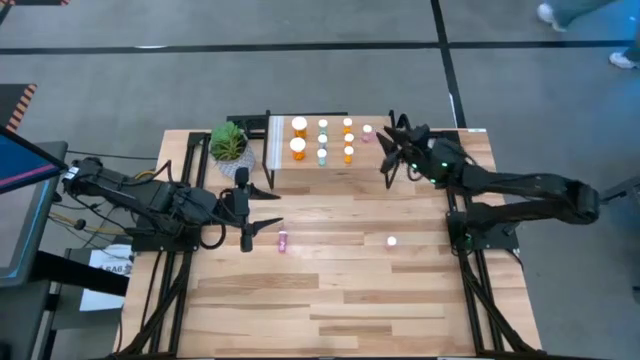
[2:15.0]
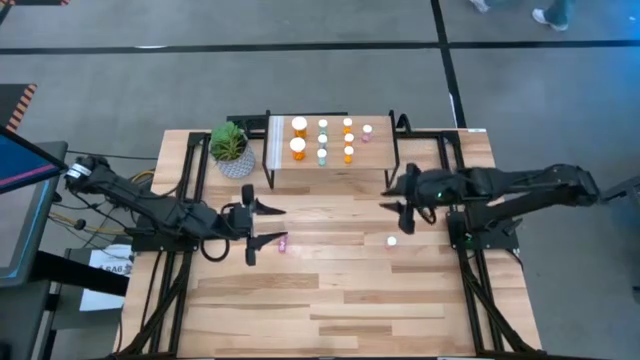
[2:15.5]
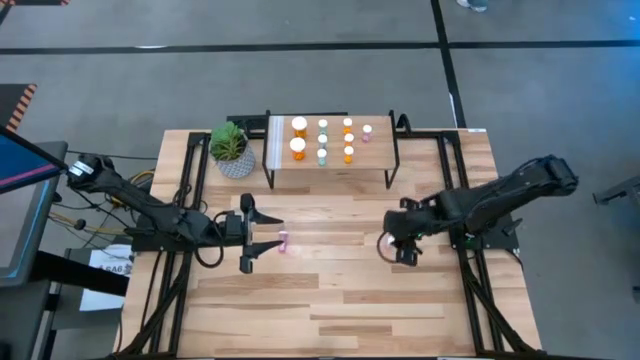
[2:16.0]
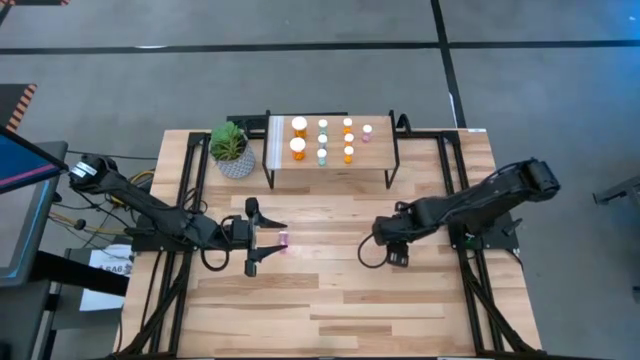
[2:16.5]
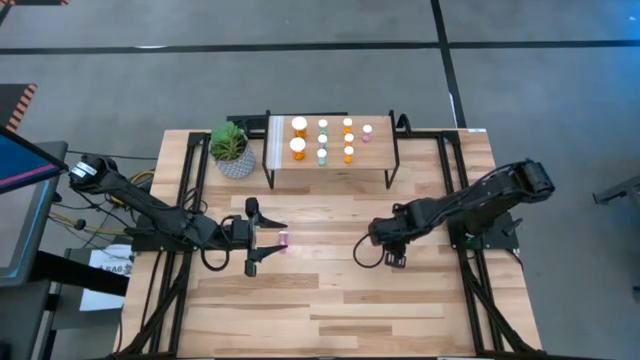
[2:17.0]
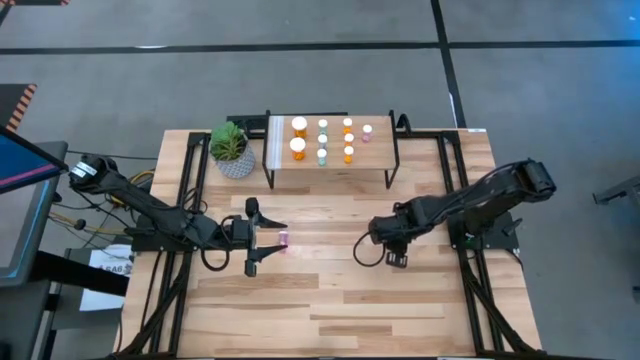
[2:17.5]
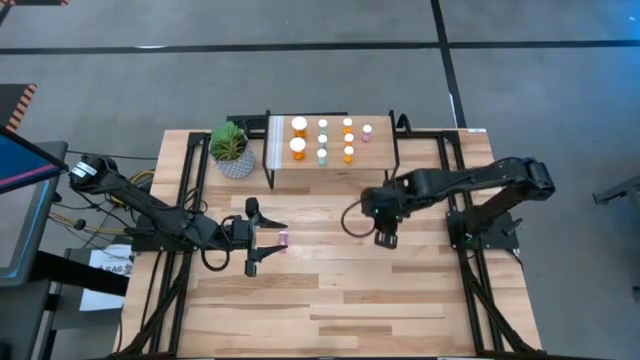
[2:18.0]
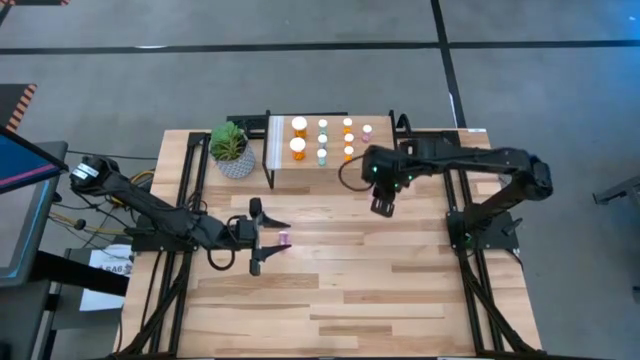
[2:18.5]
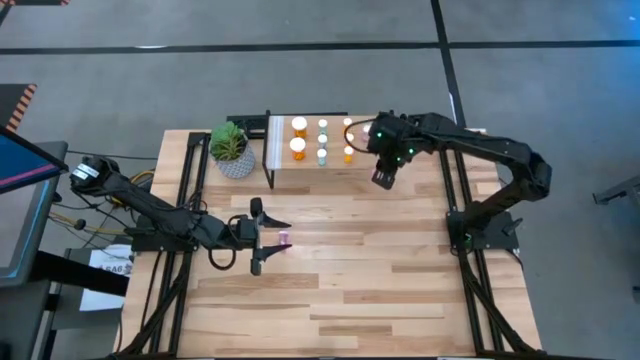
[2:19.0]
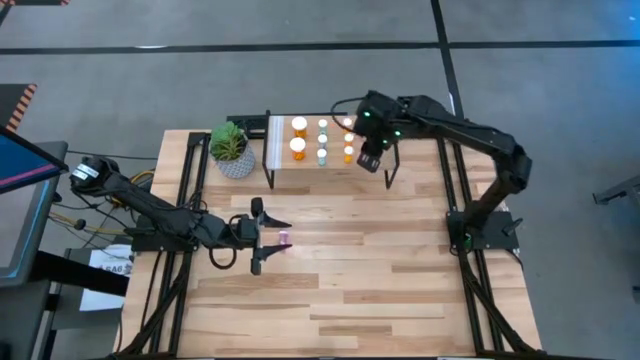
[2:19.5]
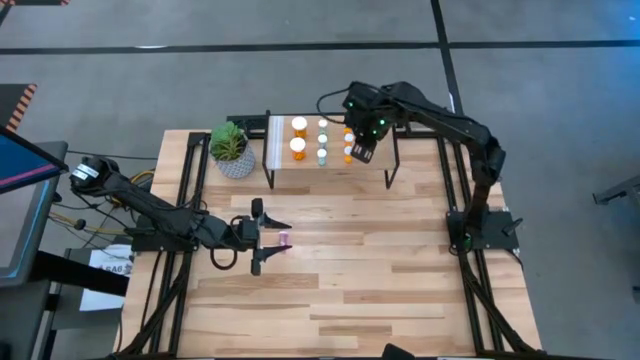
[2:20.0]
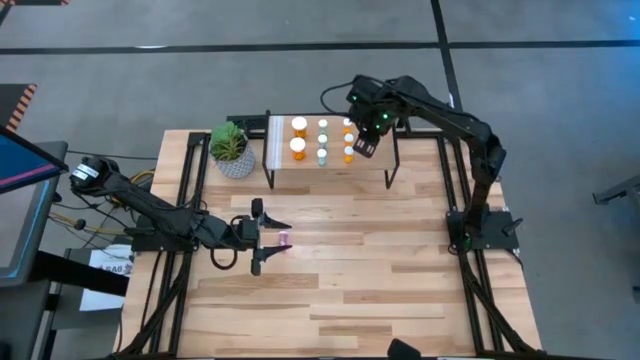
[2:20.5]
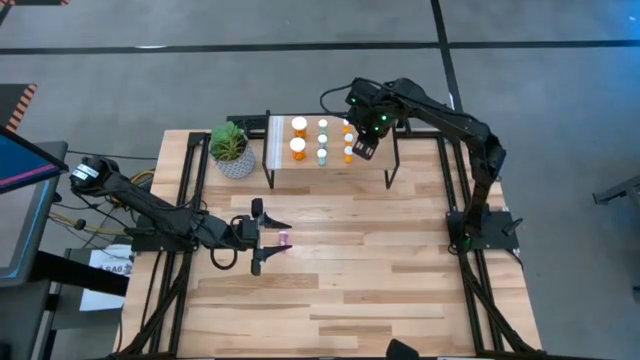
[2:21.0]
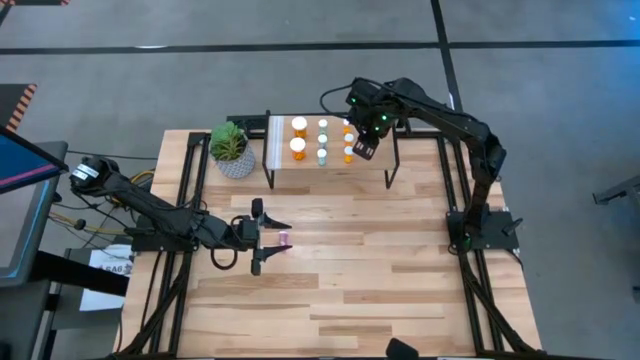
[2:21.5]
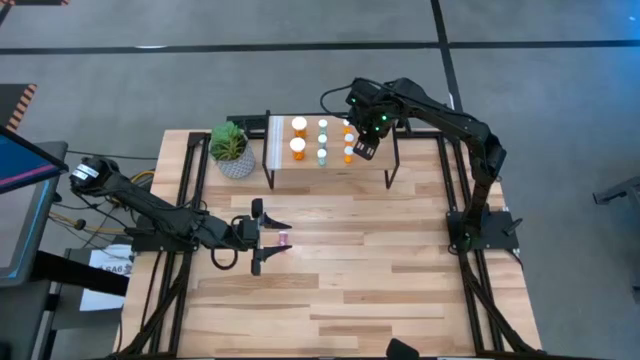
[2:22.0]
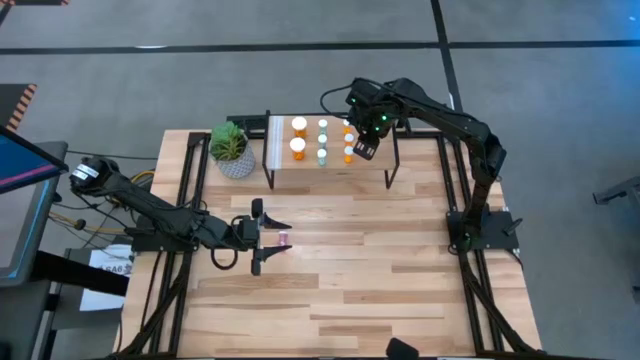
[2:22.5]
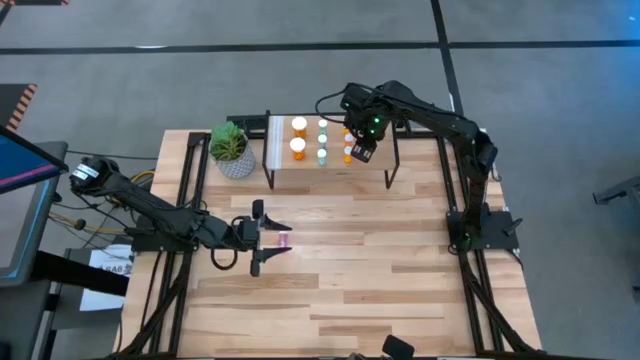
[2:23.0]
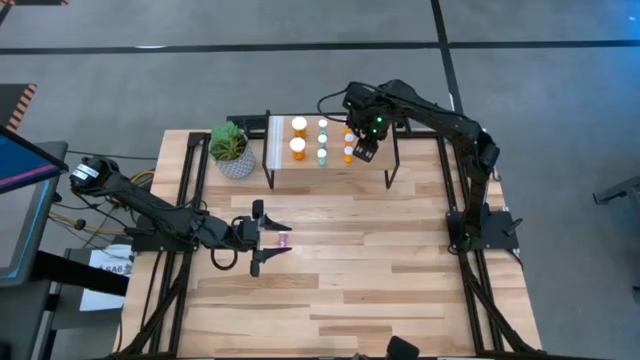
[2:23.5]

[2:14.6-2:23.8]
Task: Pick and place medicine bottles onto shelf by color
Put the pink pill bottle on the shelf aligned with the other pink pill bottle

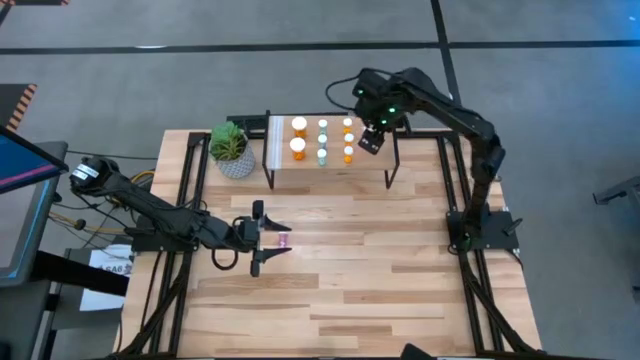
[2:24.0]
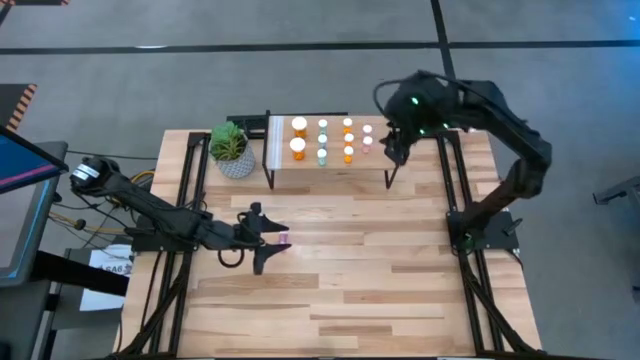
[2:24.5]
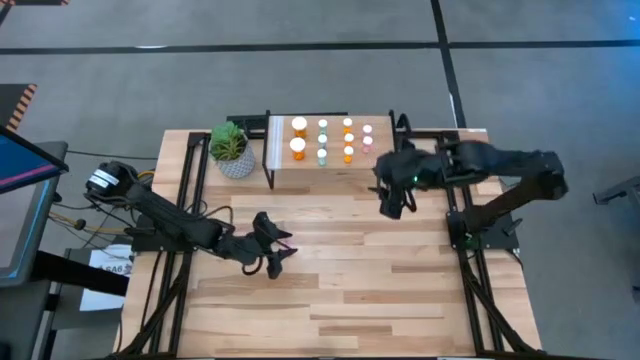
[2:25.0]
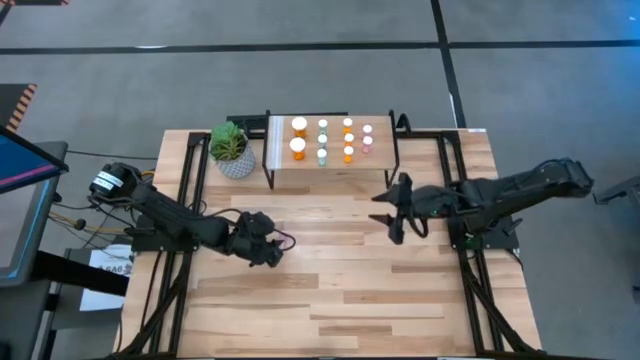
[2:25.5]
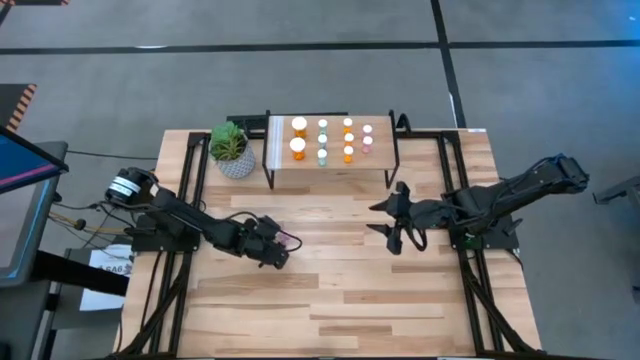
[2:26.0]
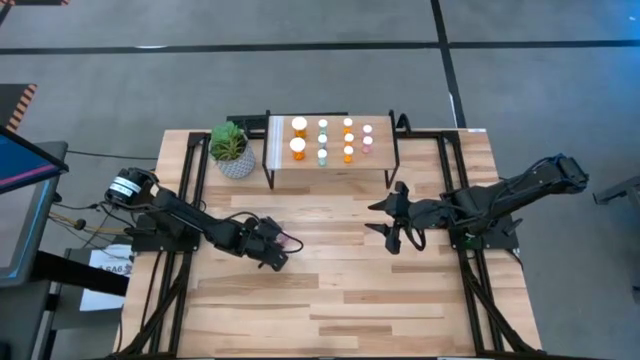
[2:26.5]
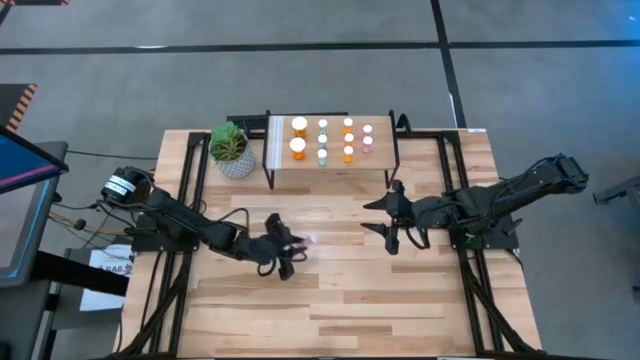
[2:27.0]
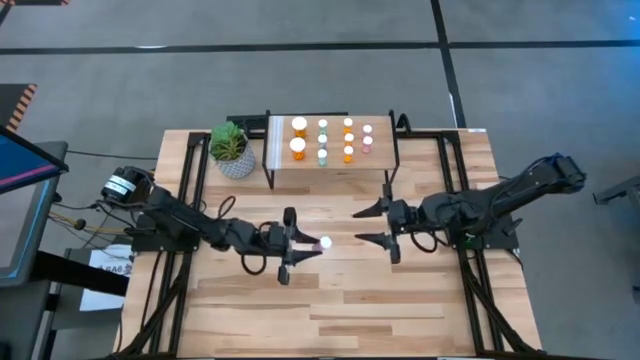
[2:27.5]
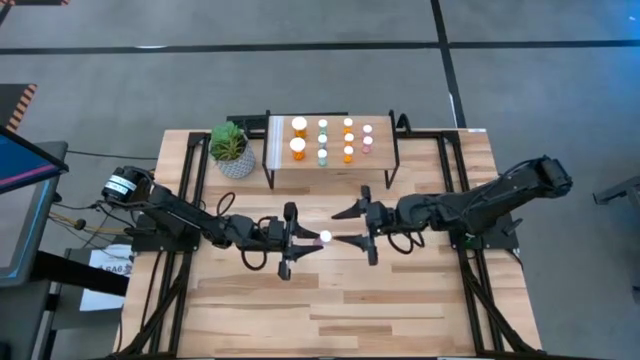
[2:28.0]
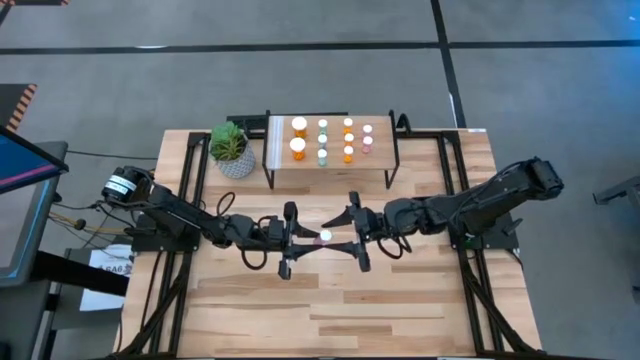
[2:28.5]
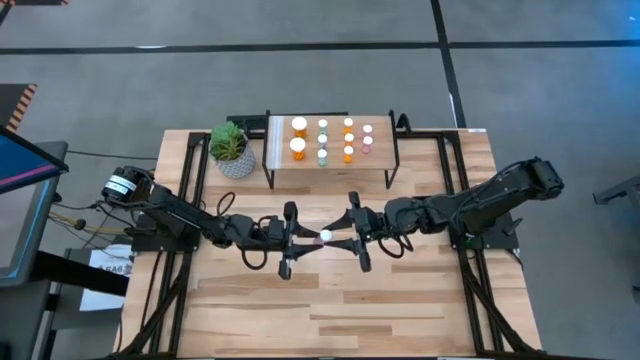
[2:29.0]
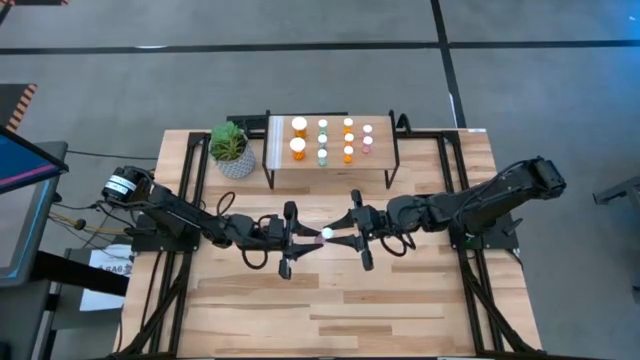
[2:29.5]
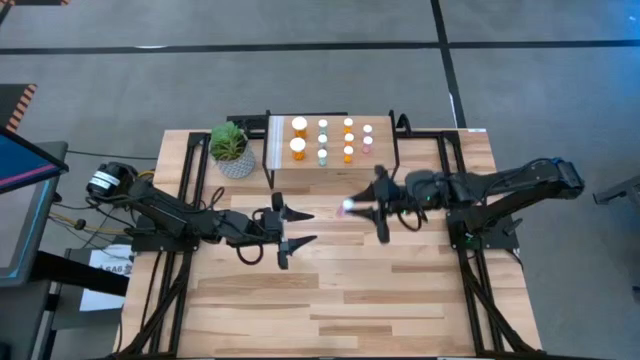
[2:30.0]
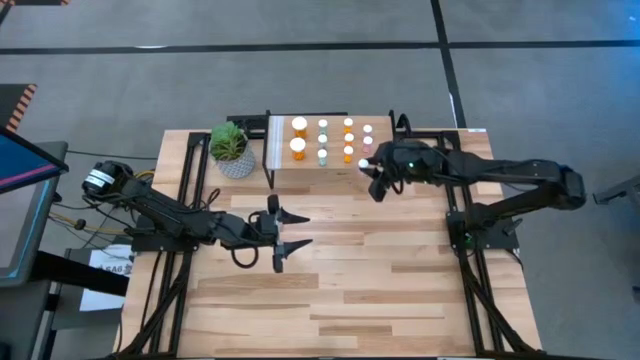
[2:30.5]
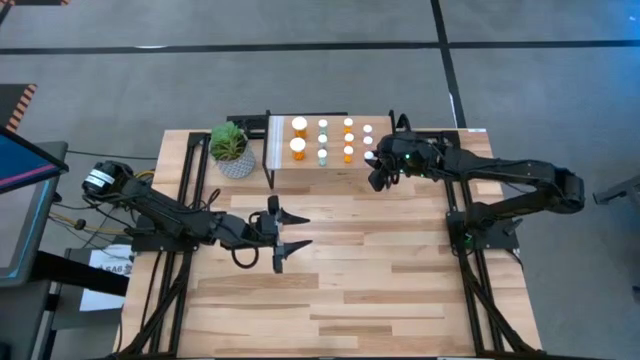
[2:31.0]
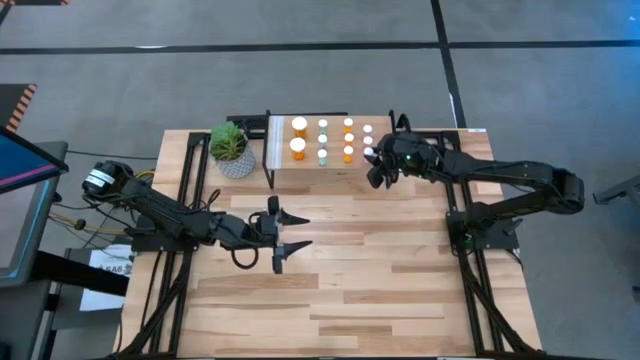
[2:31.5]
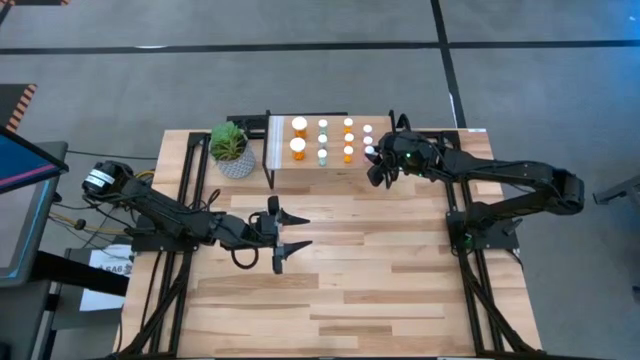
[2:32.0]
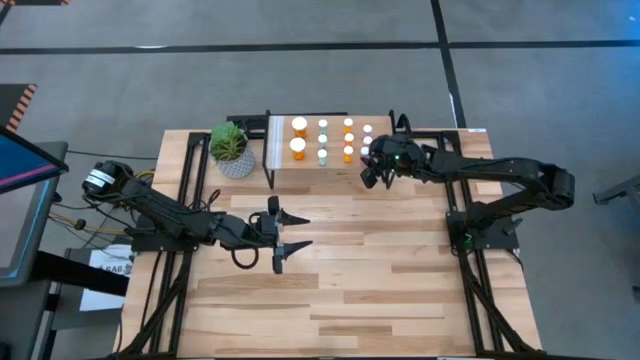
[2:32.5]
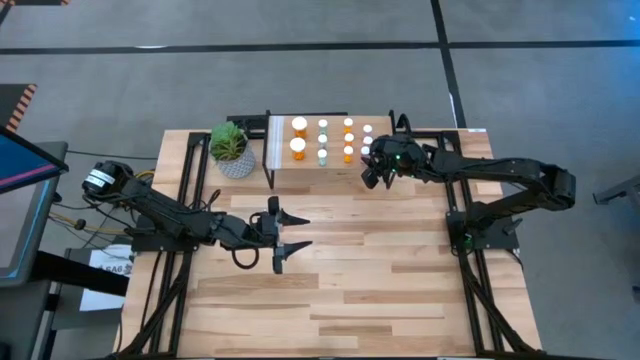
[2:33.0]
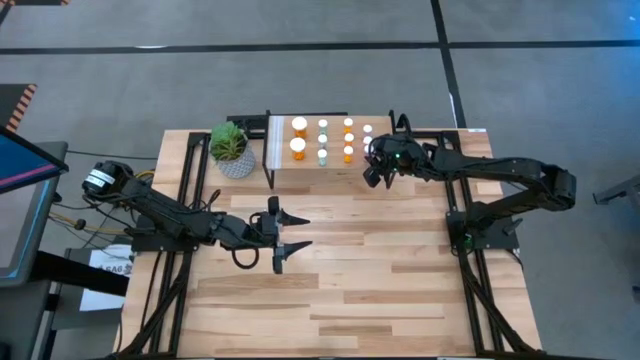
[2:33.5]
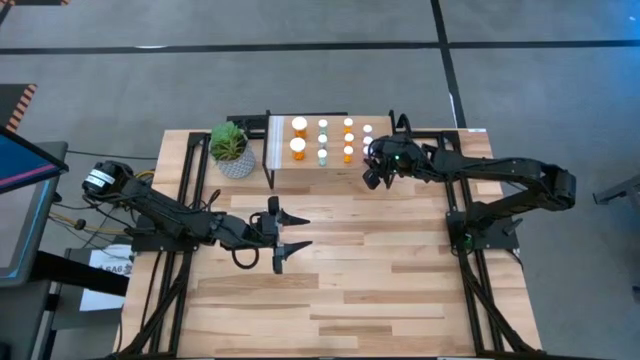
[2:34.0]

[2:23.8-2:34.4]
Put the pink pill bottle on the shelf aligned with the other pink pill bottles

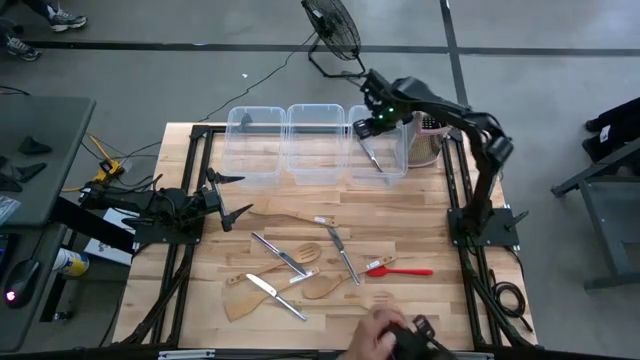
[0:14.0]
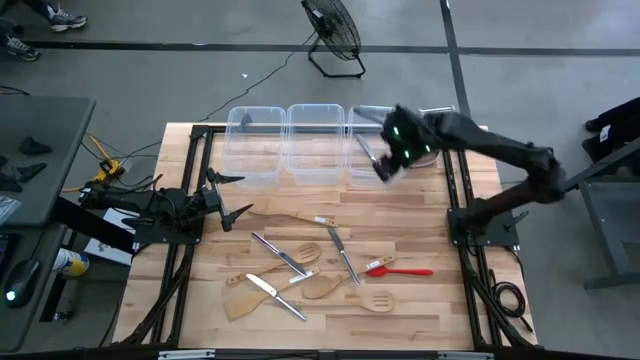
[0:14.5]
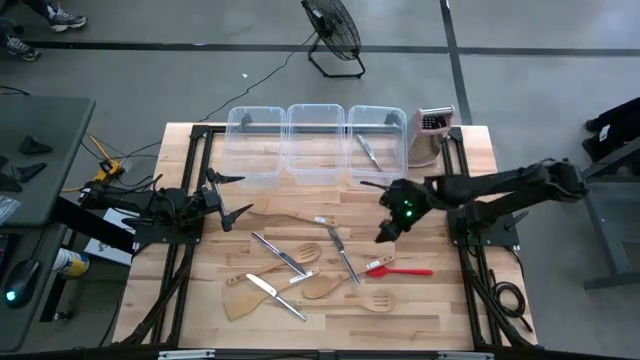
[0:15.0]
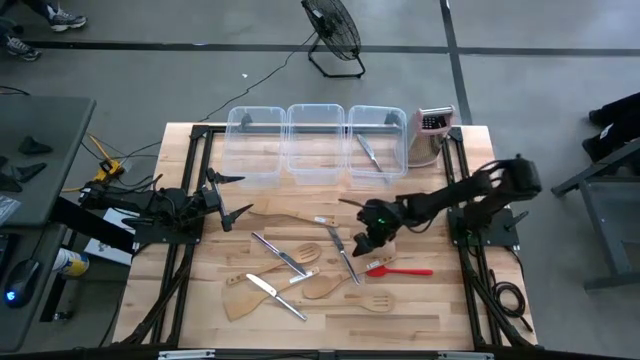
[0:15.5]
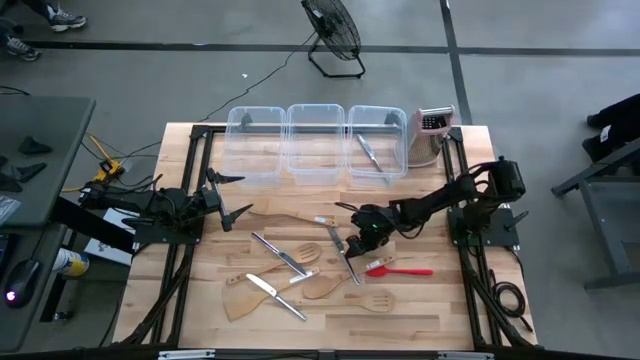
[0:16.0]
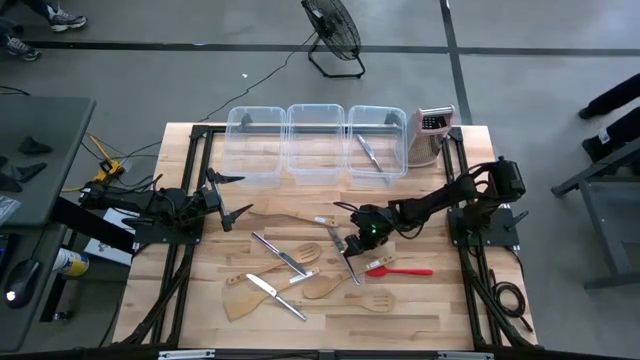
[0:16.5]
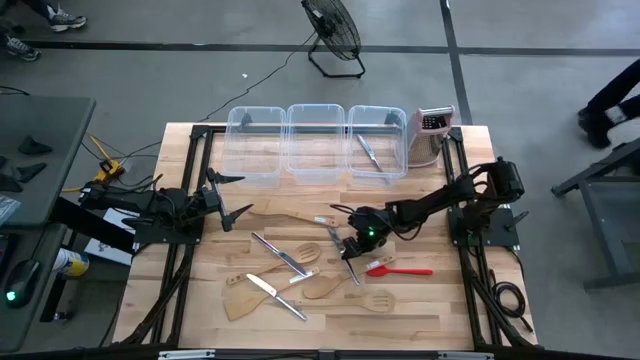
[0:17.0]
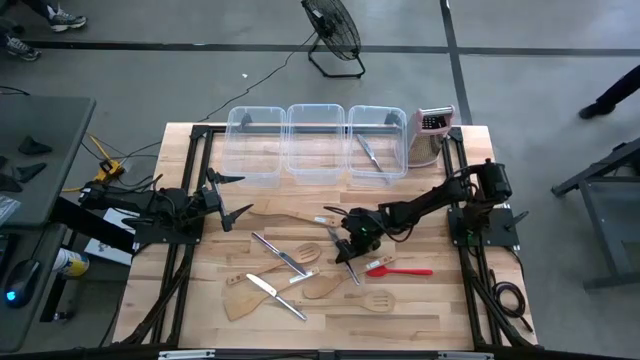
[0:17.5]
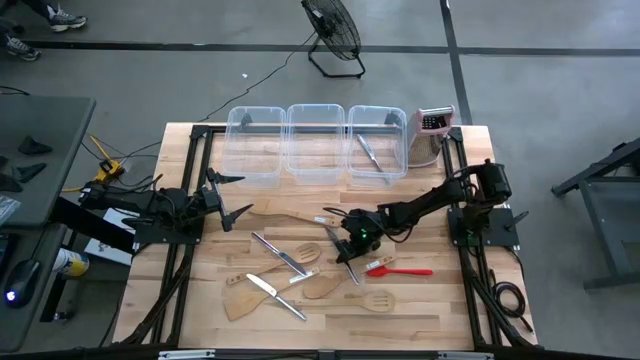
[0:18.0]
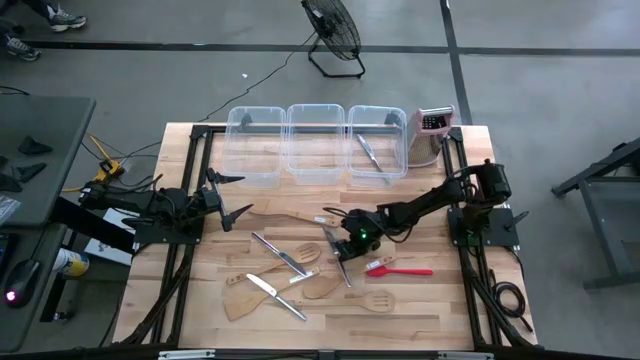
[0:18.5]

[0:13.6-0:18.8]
Task: Pick & Place Kitchen Items
Put the table knife into the right transparent bin
